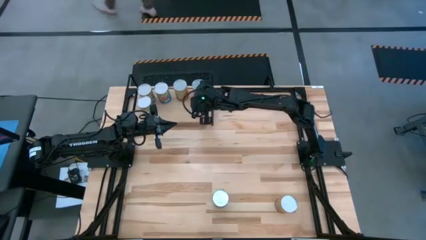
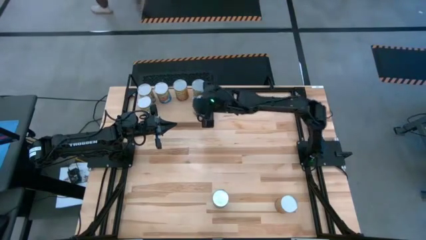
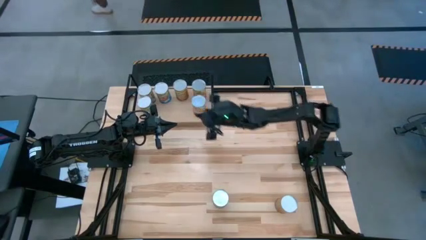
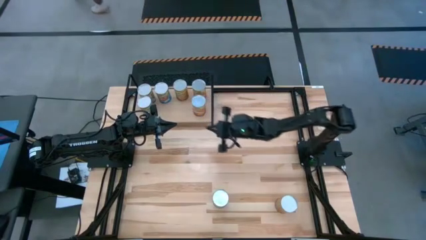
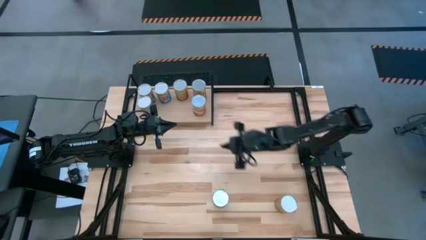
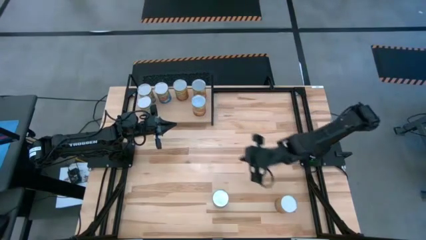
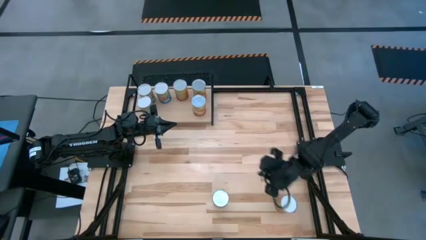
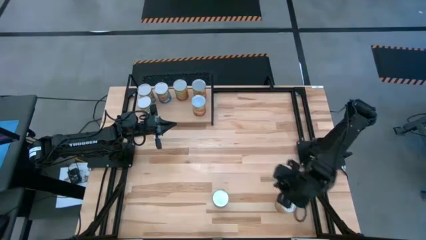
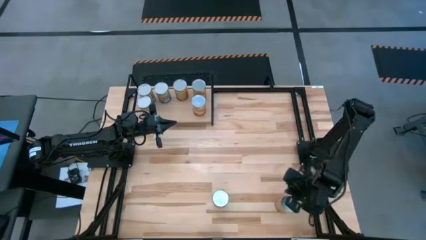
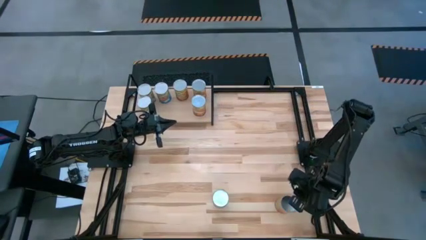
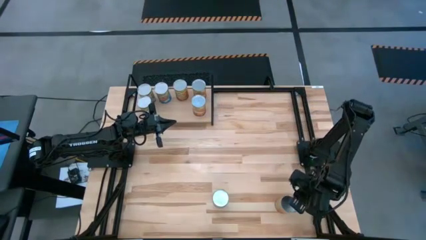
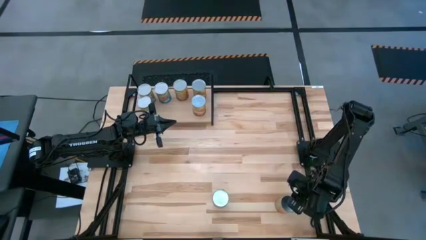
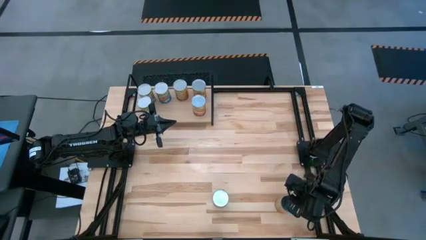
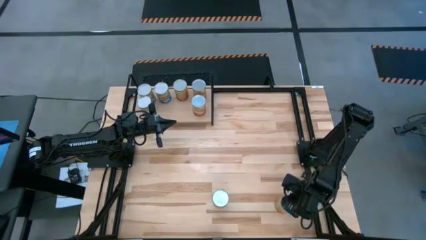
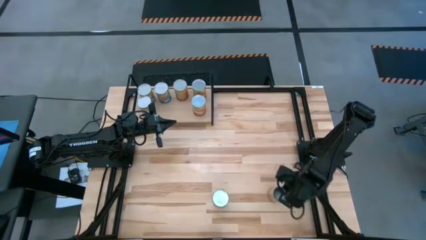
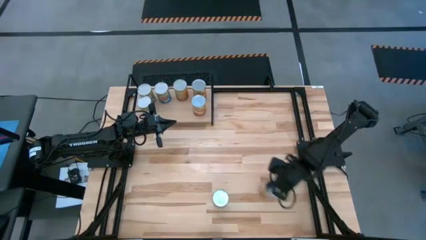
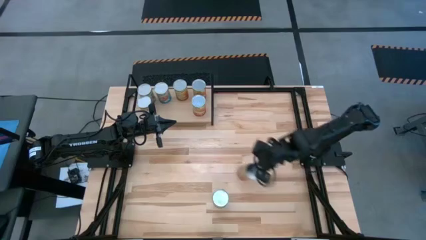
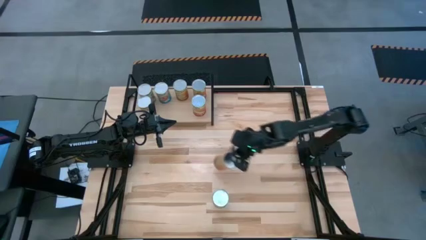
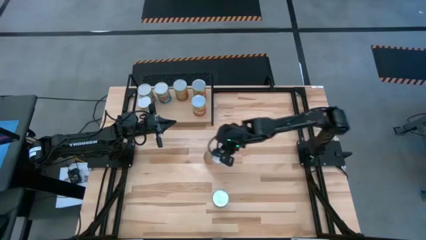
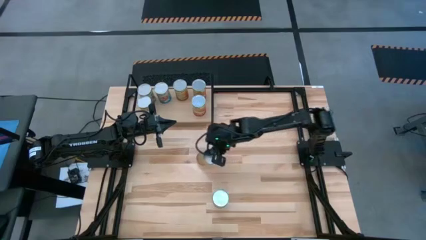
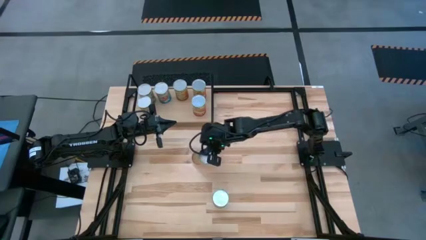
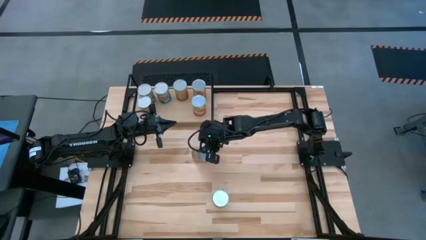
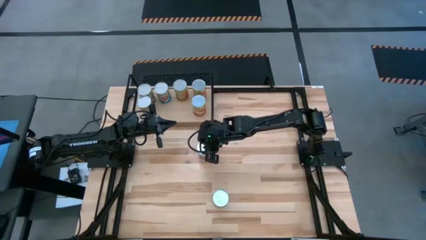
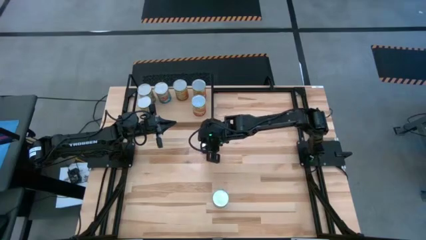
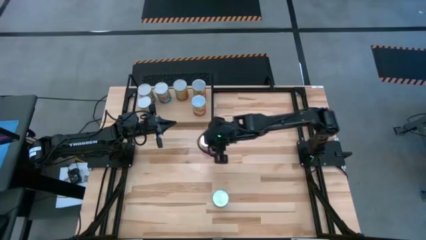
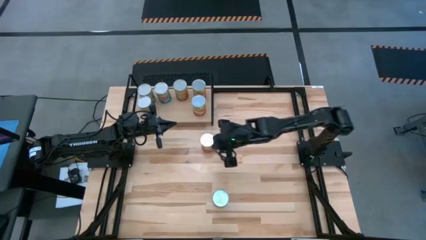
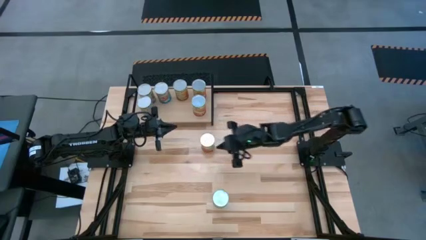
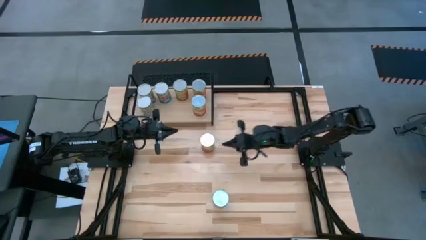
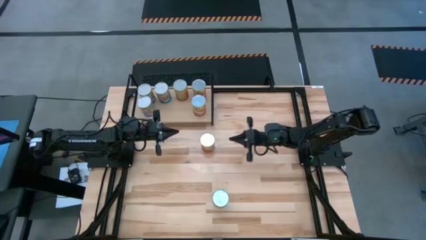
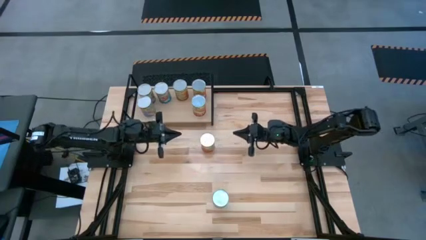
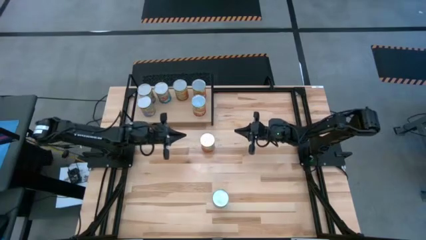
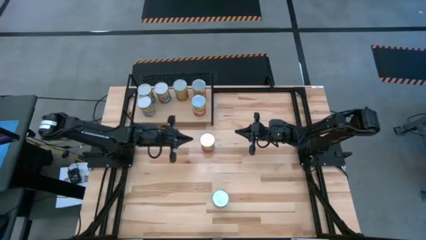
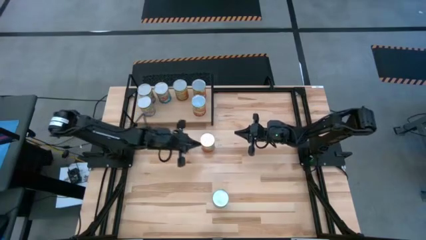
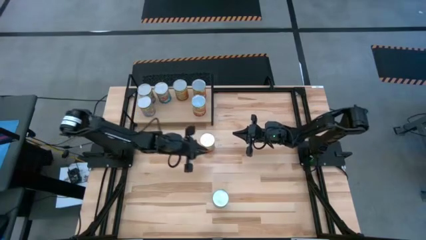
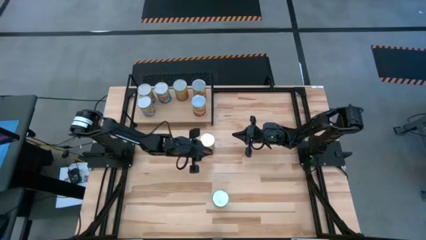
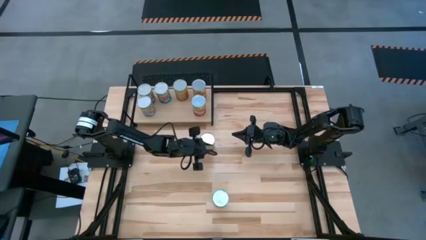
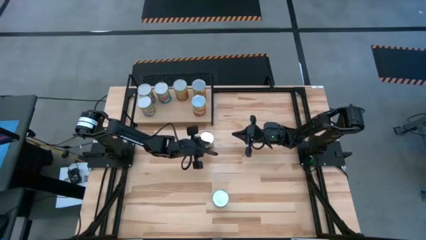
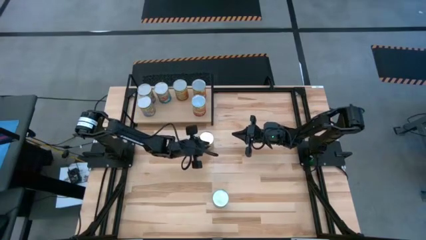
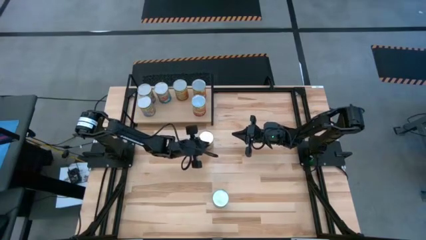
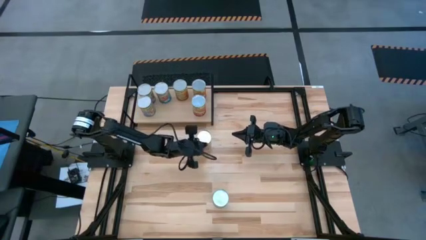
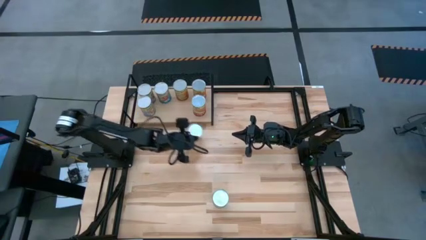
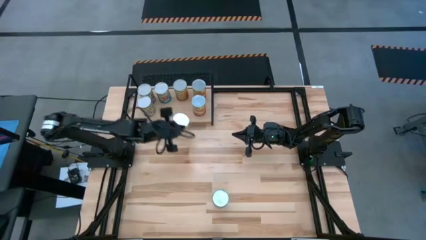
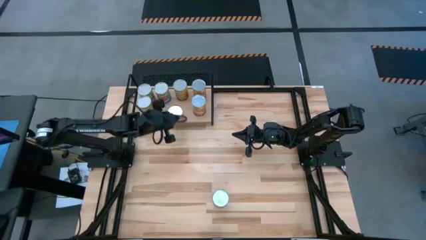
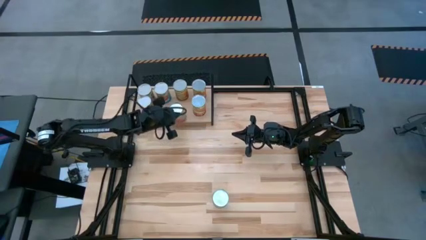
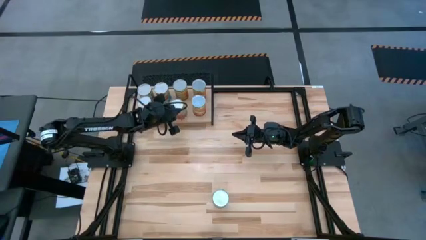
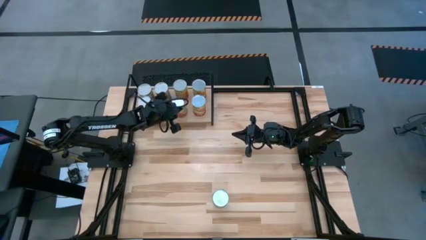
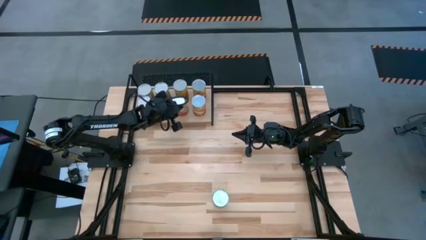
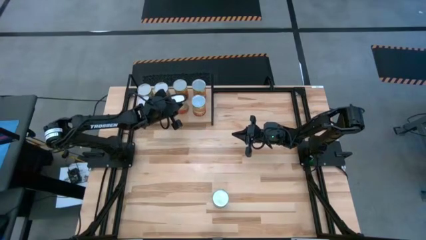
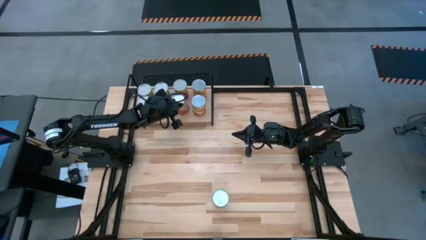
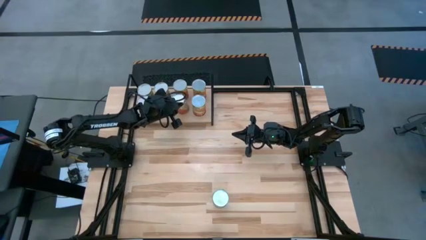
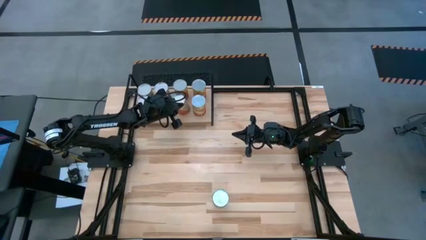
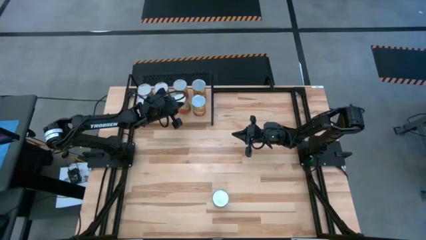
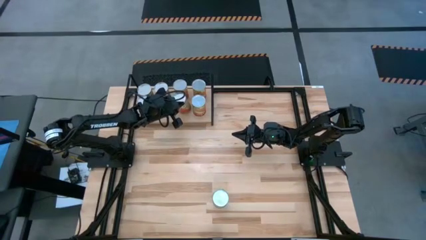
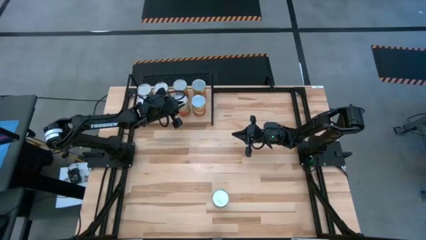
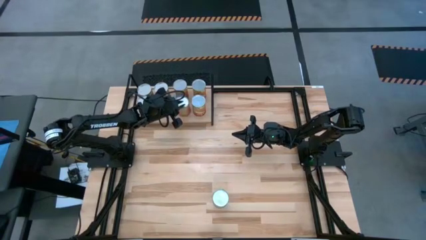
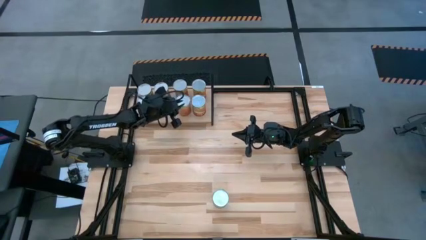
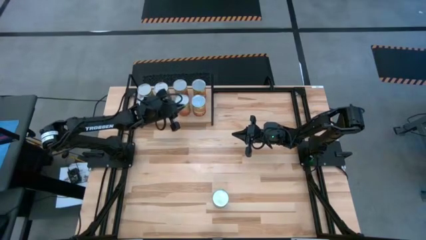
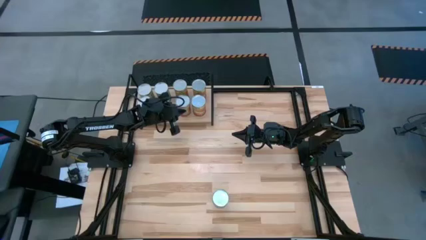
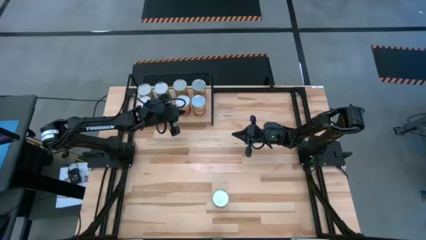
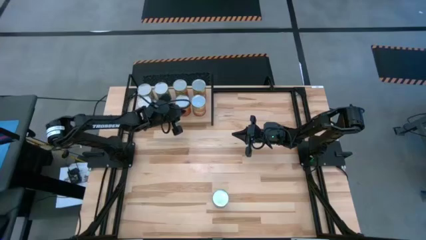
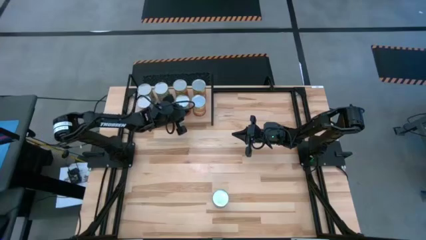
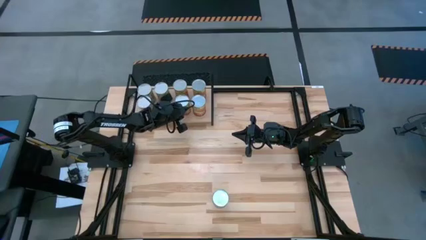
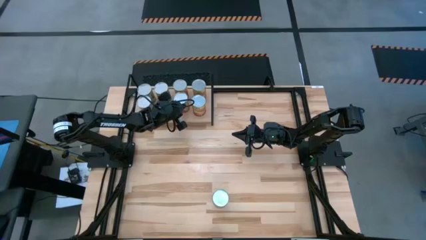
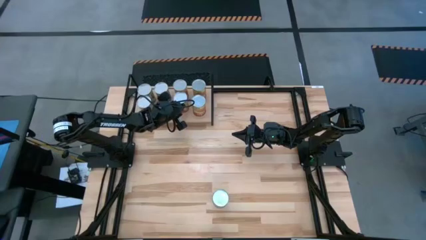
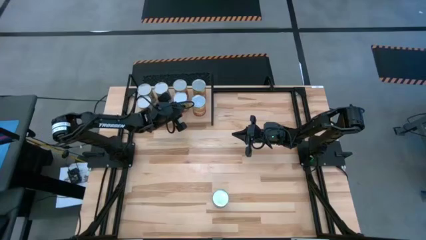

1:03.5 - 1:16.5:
Task: Pick and place cans onto a shelf
Put the canned green beans on the shelf aligned with the other canned green beans on the shelf

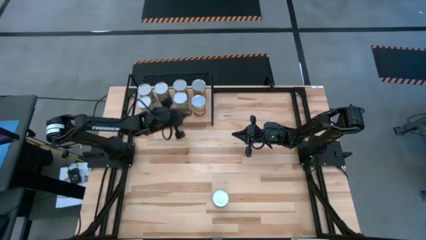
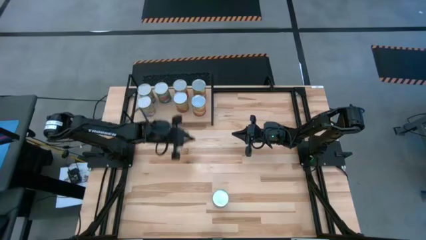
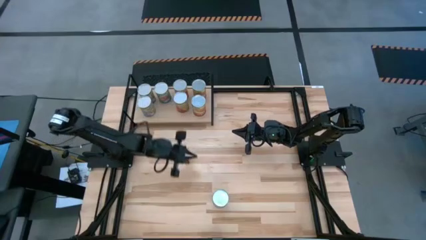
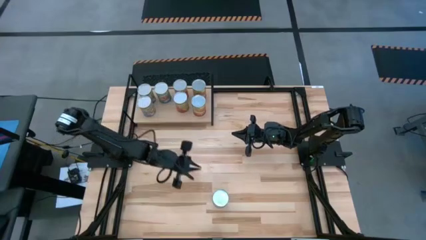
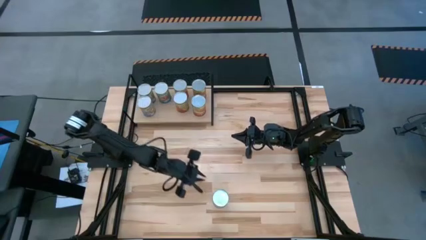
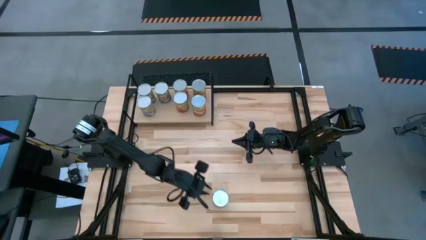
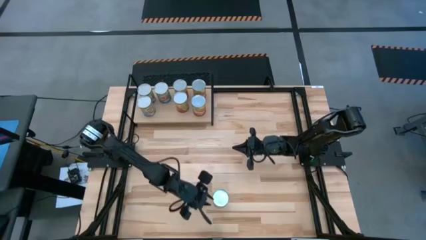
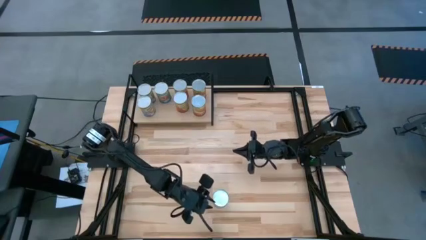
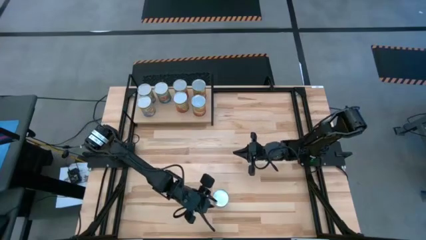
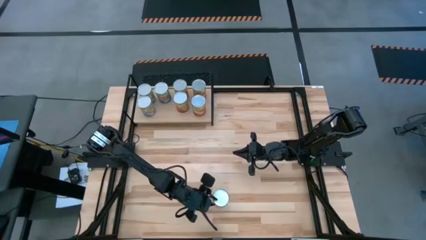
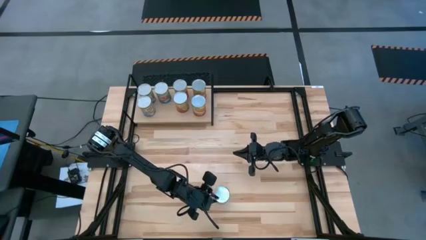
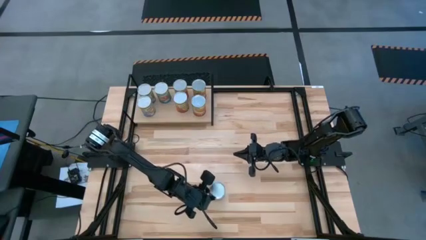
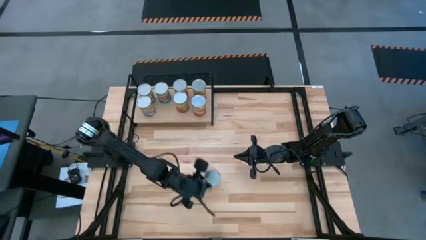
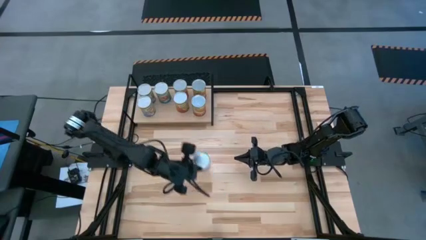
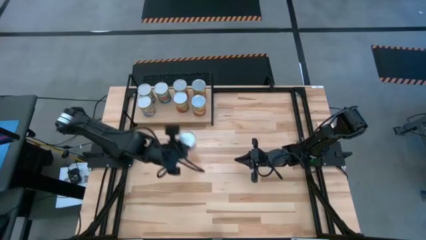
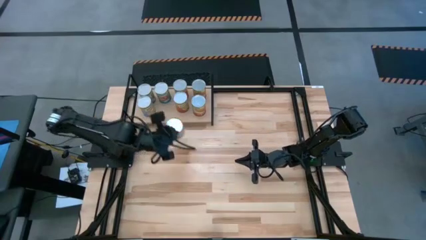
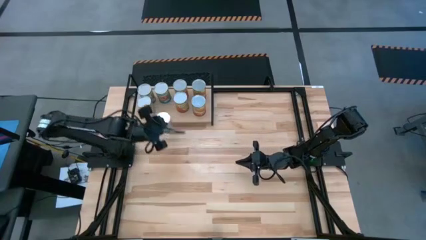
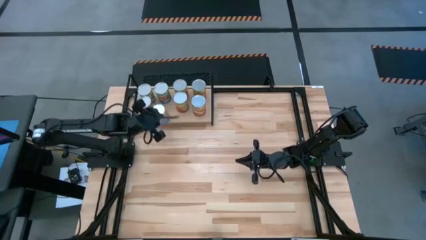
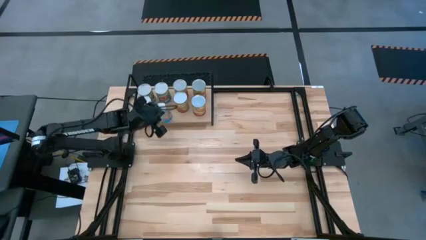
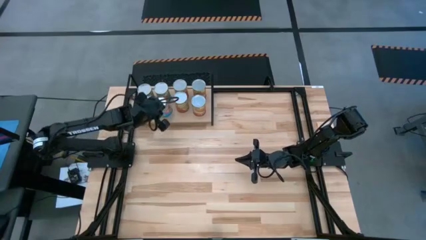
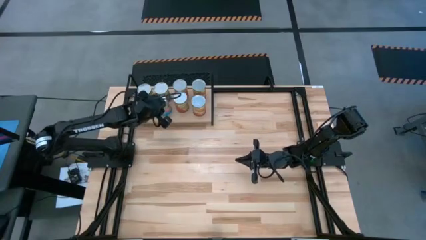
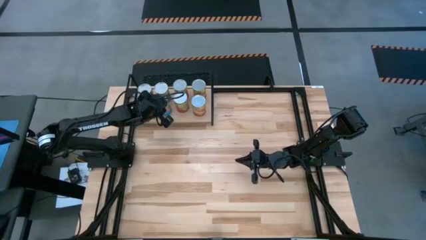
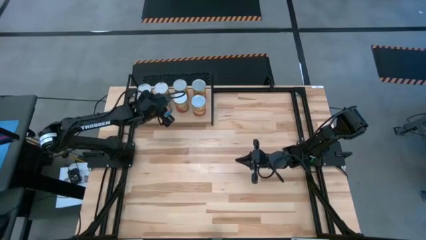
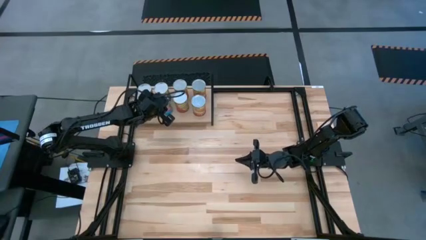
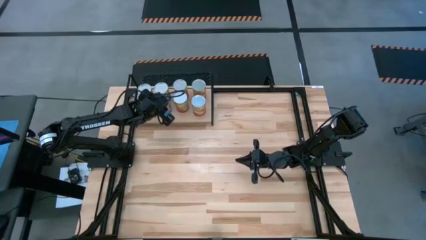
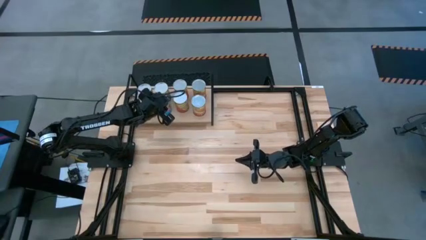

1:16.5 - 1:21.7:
Put the canned tomatoes on the shelf aligned with the other canned tomatoes on the shelf
